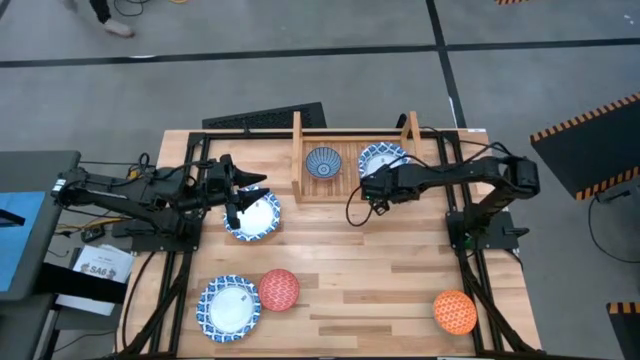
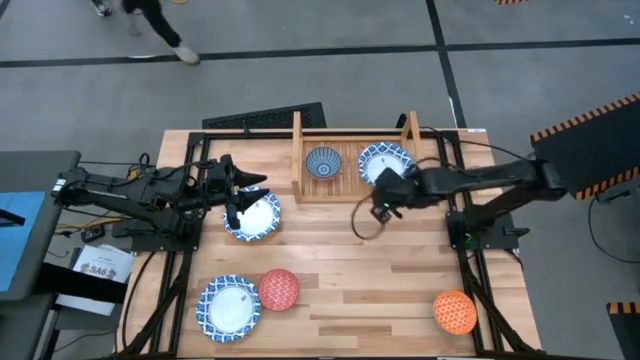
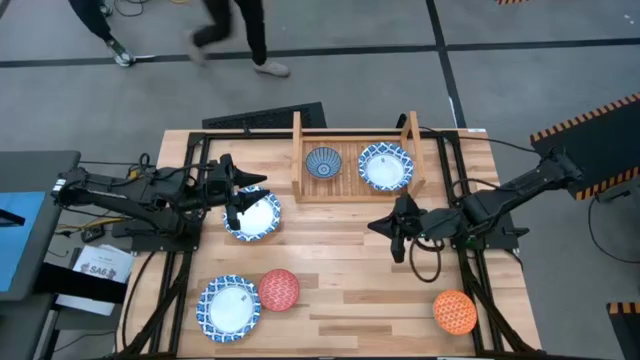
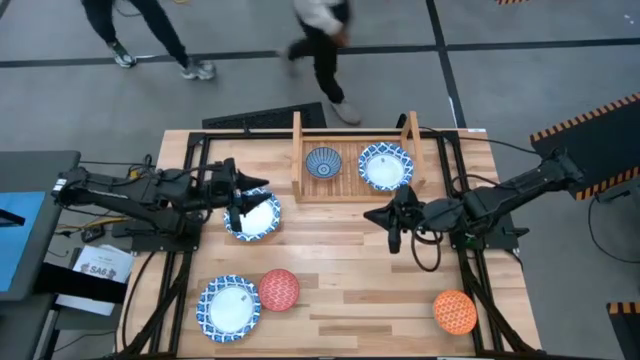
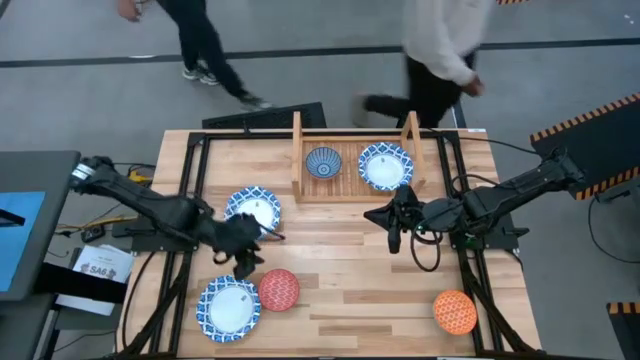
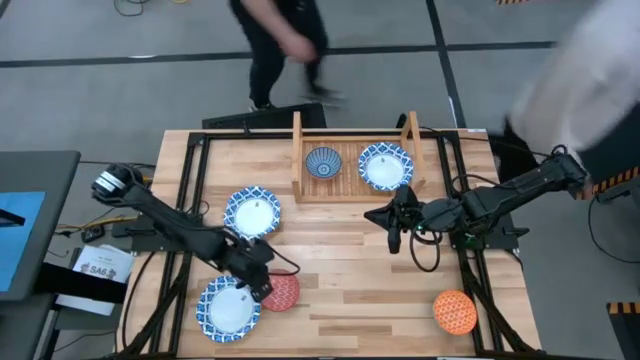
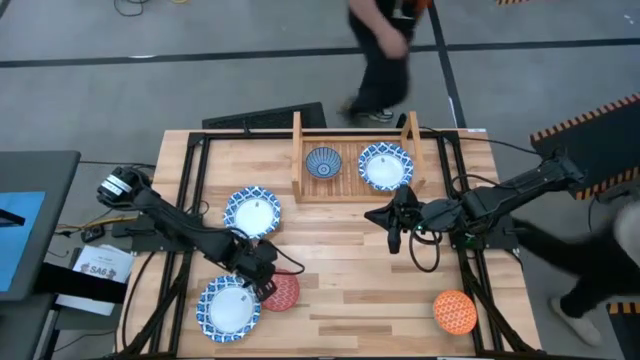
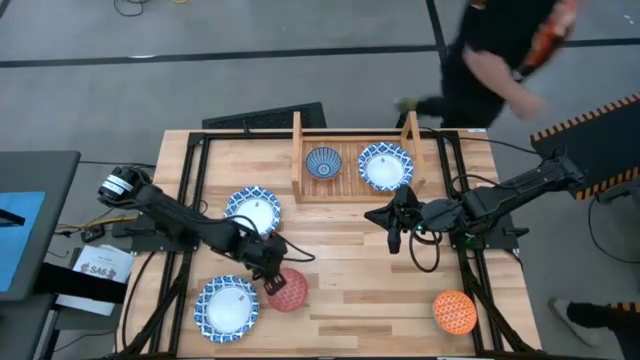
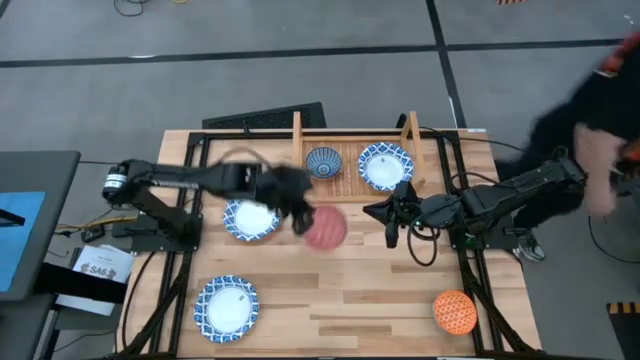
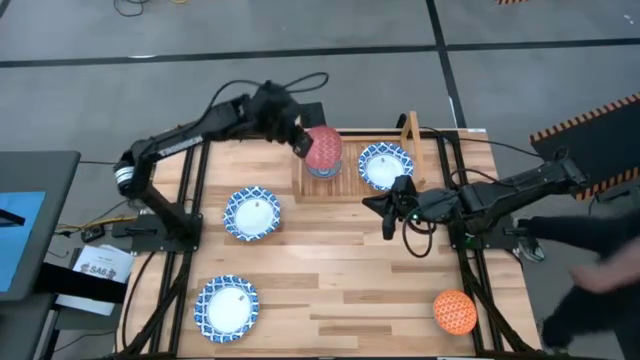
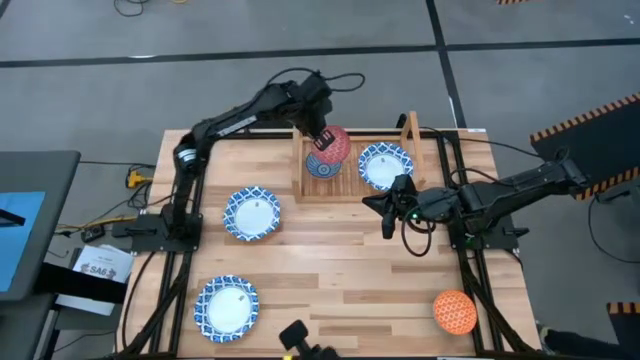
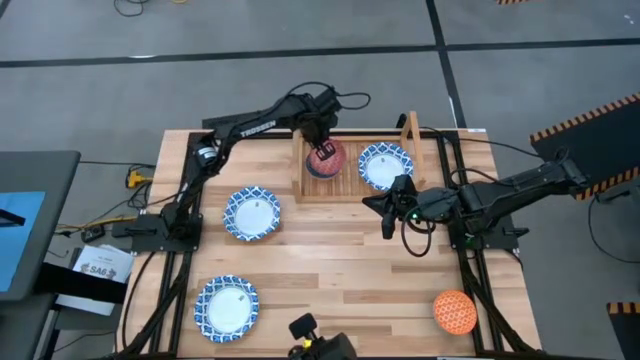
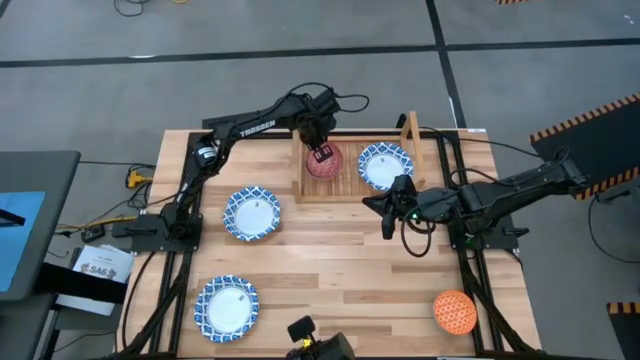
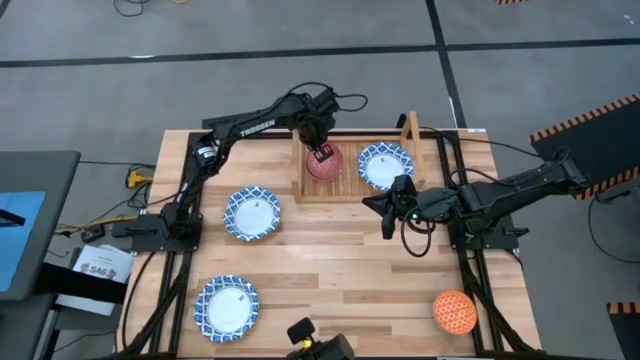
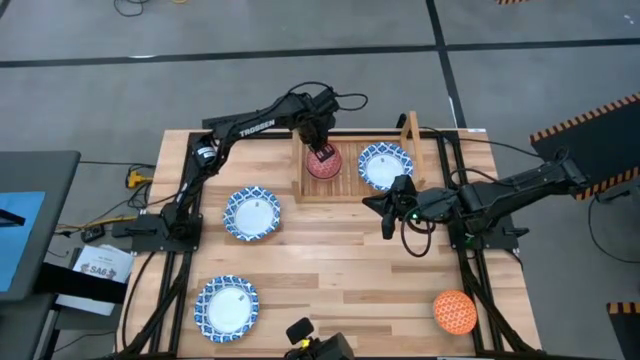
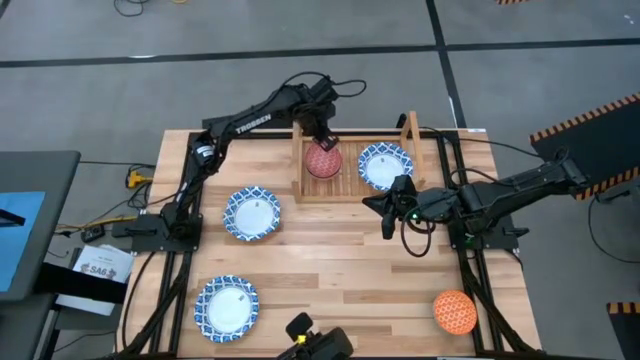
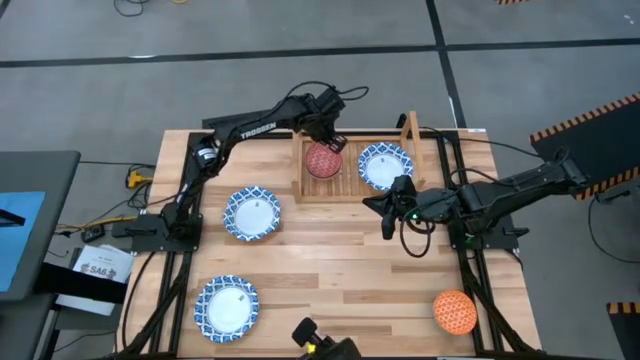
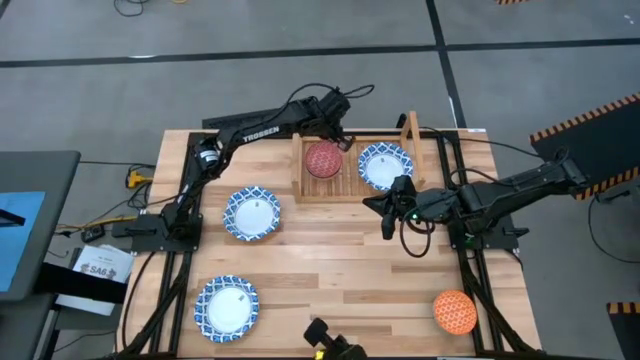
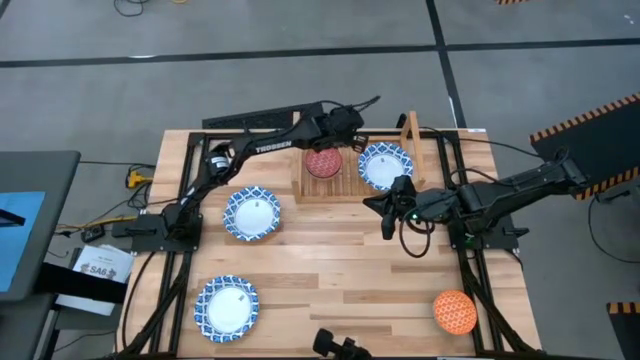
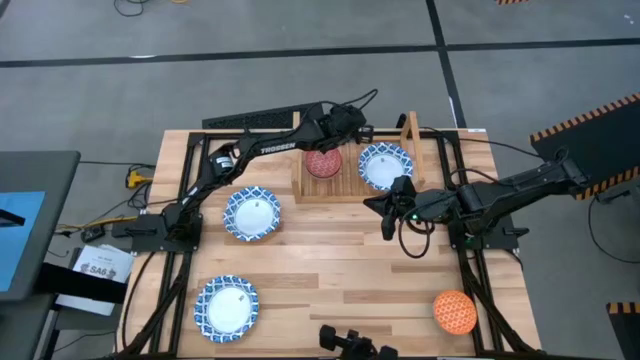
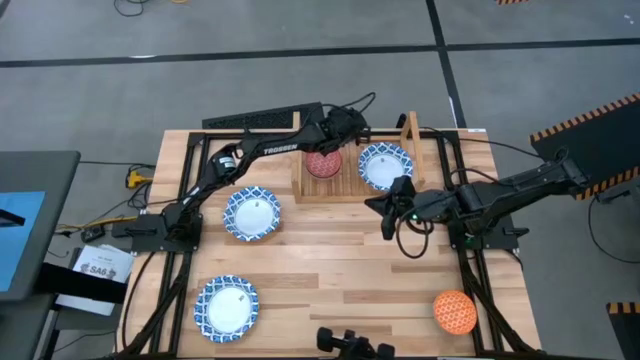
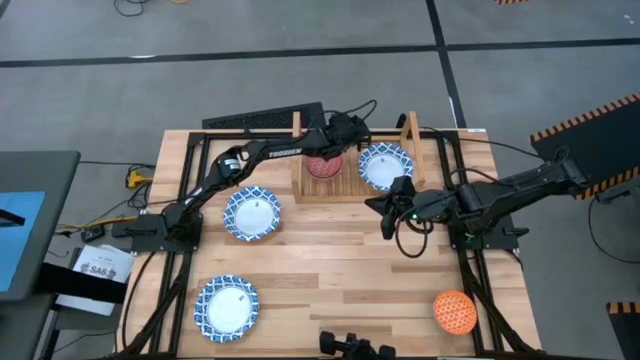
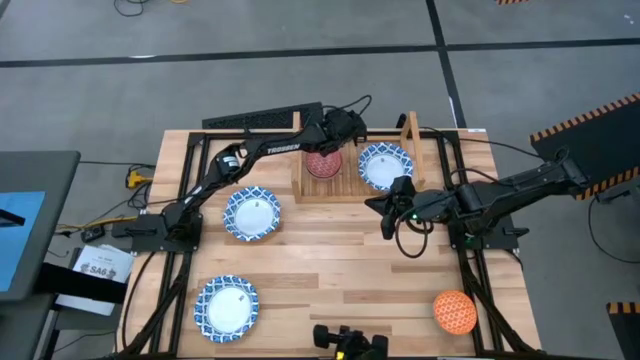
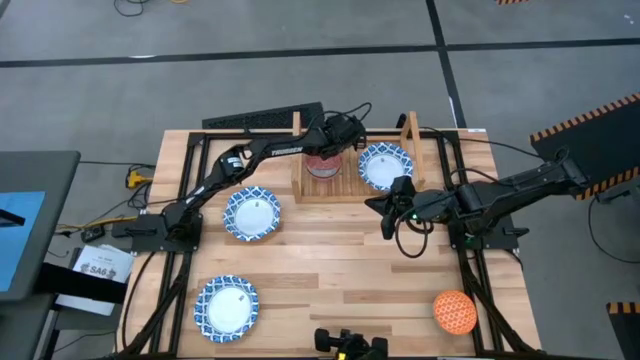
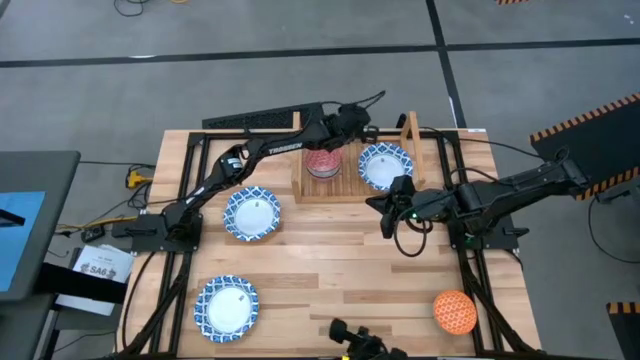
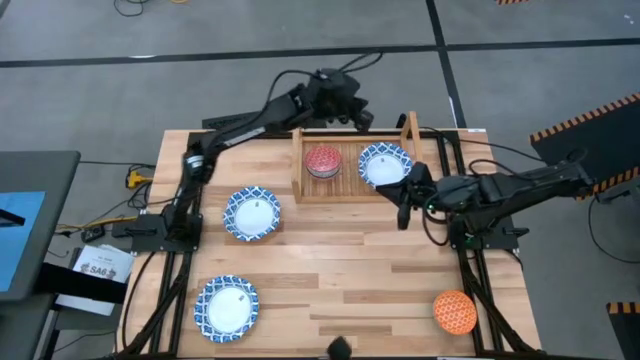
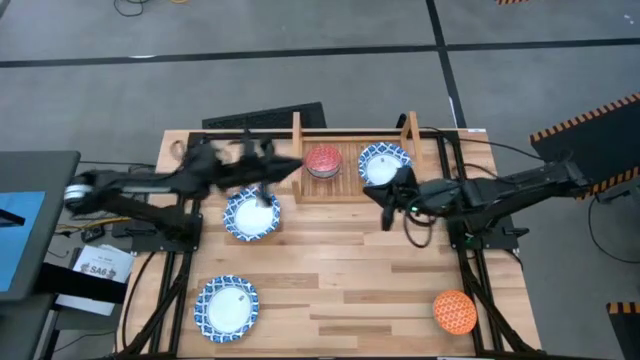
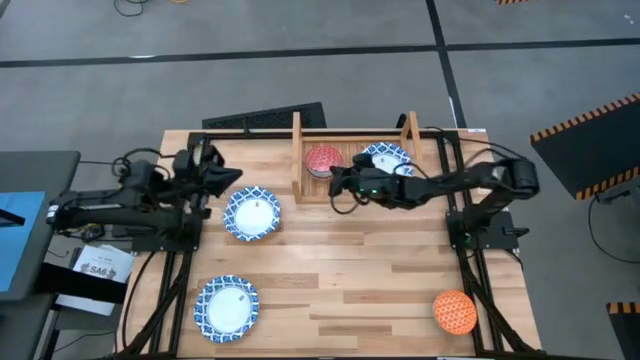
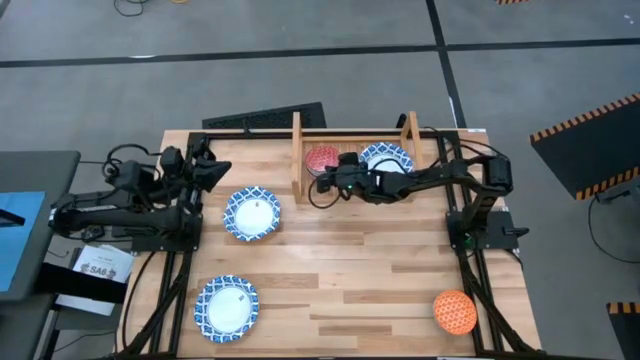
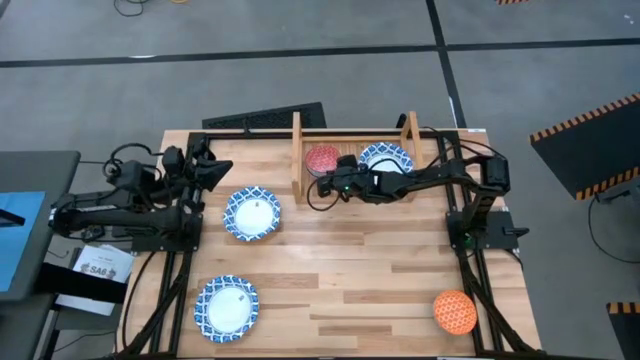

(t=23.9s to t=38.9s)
Task: Place and stack bowls onto a shelf
Stack the red small bowl into the dark blue small bowl on the shelf

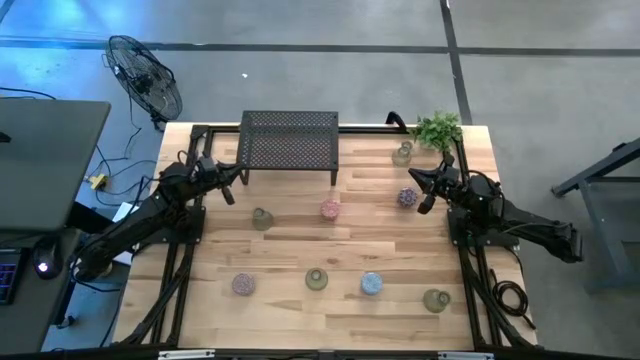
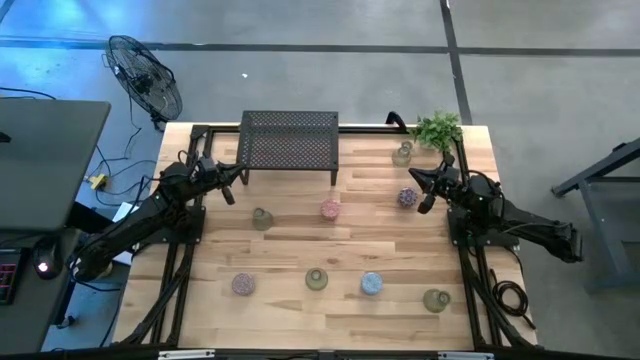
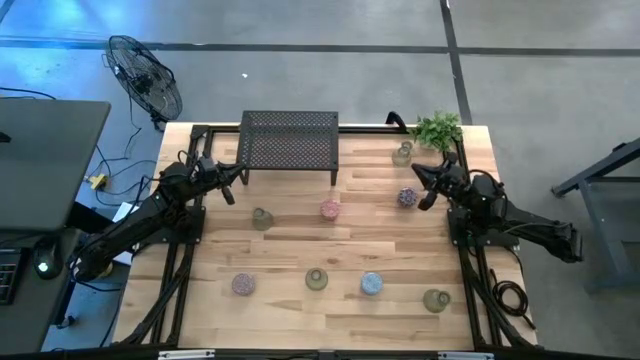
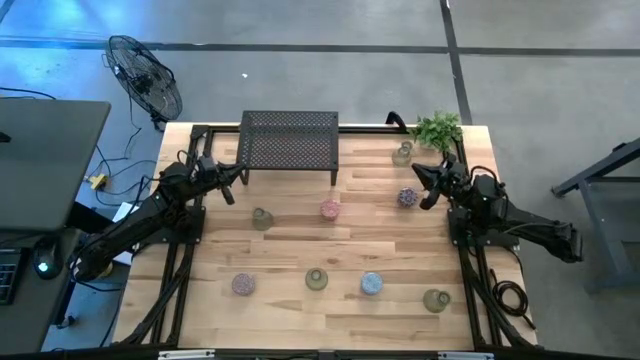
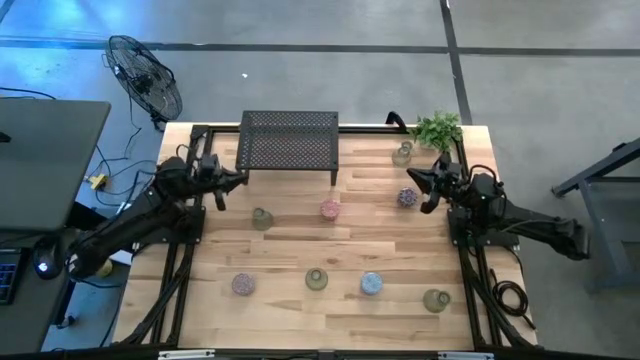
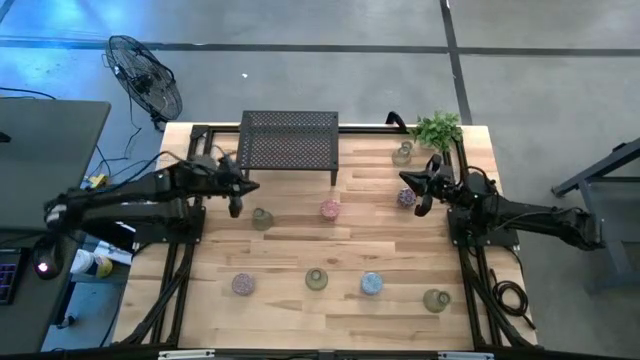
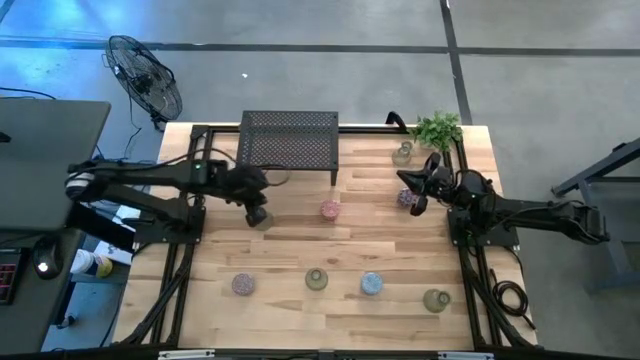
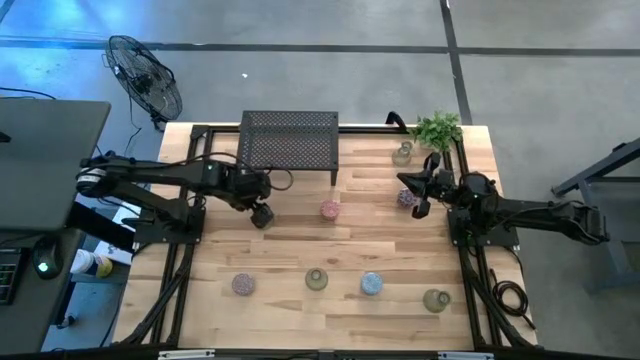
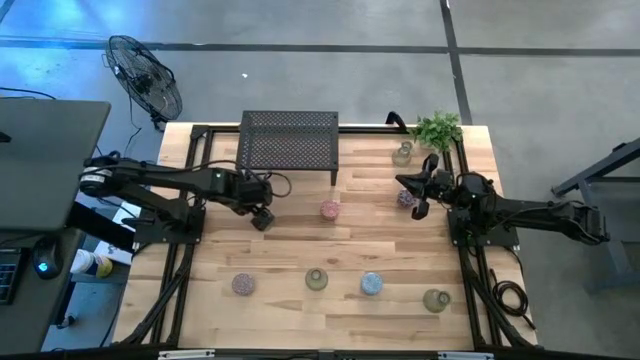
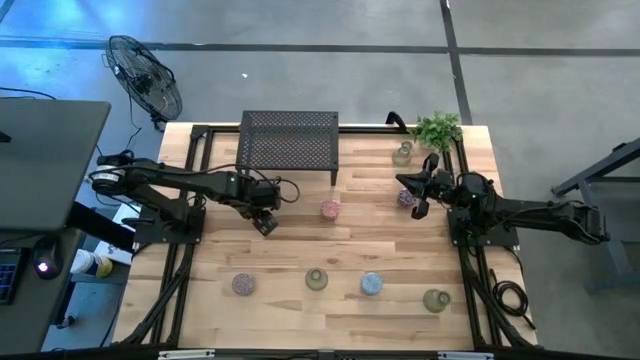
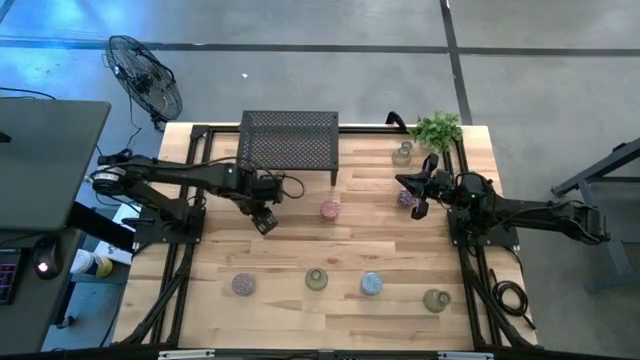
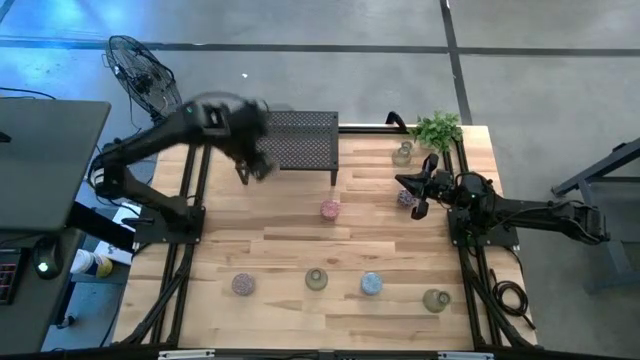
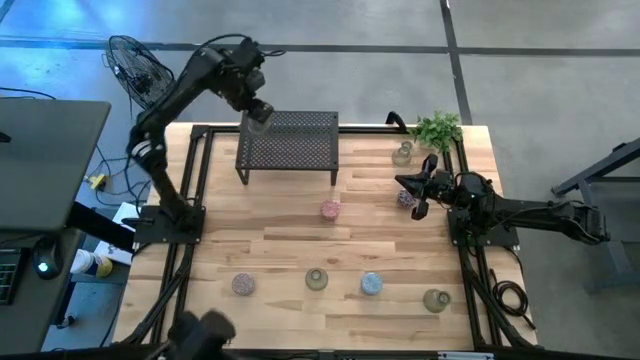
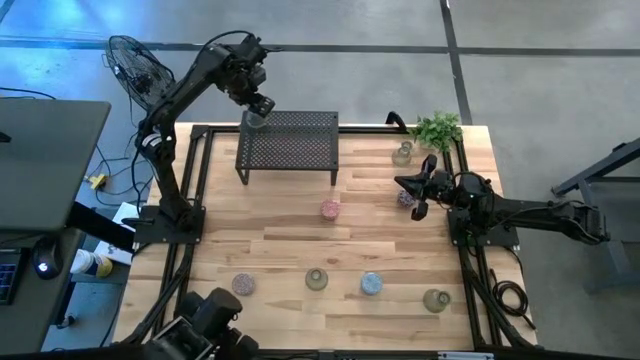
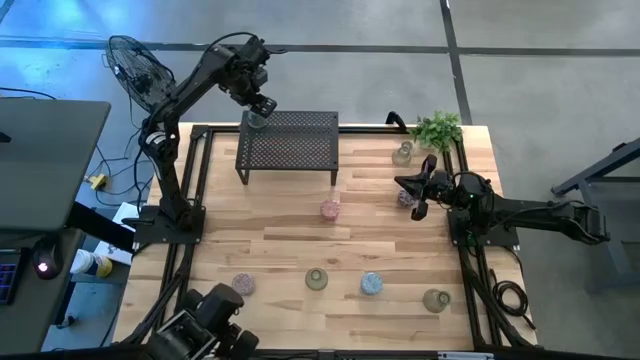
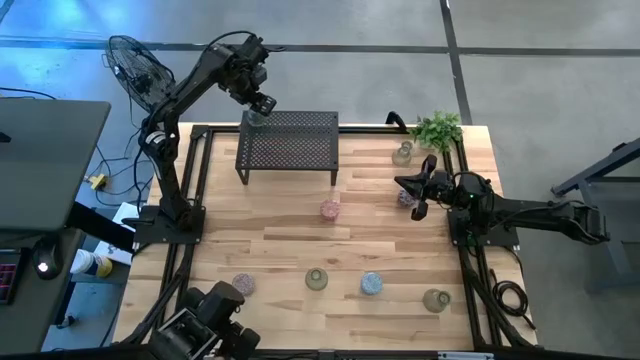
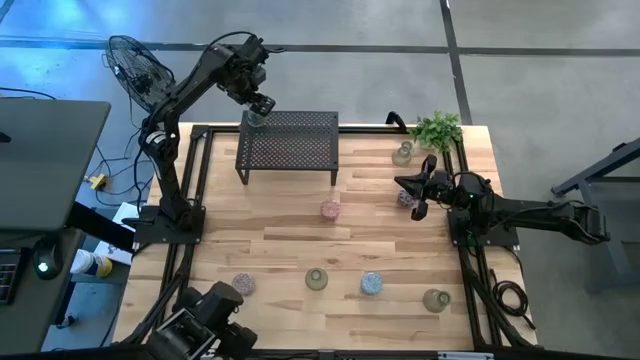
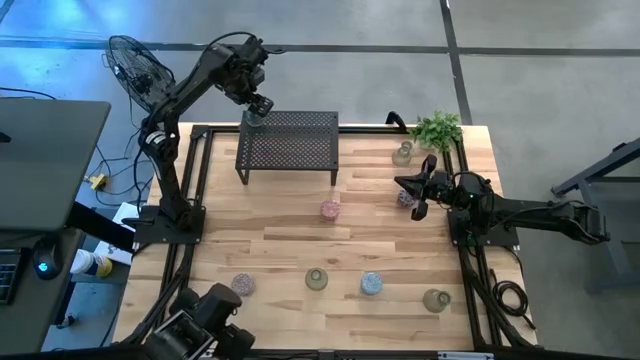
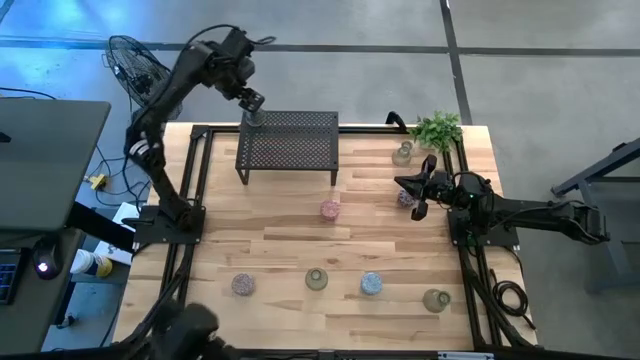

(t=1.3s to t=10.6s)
Task: Pick & Place candle stick holders
Put the green glass candle holder on the shelf
